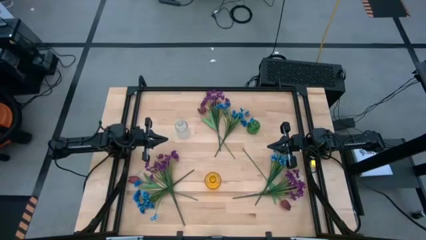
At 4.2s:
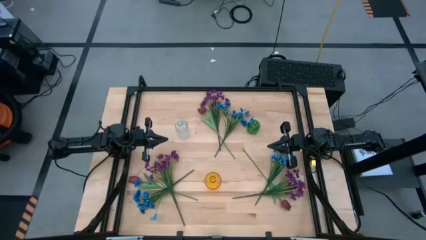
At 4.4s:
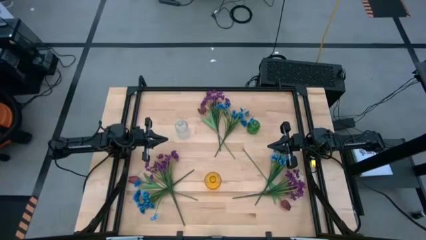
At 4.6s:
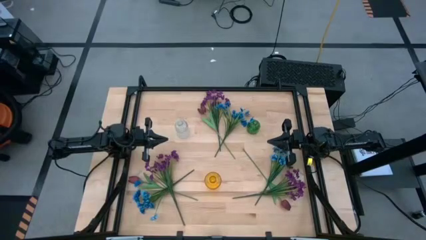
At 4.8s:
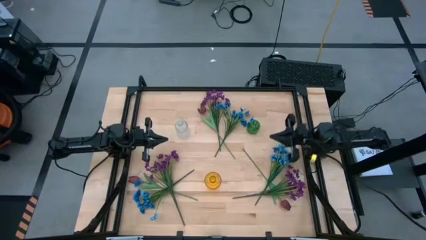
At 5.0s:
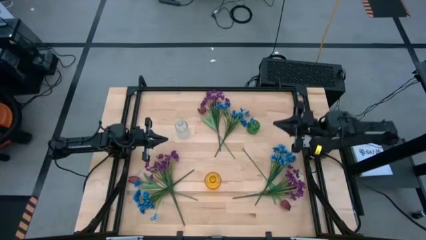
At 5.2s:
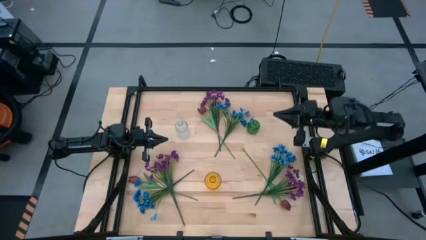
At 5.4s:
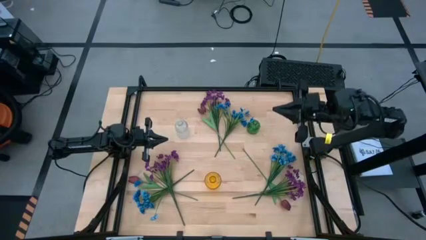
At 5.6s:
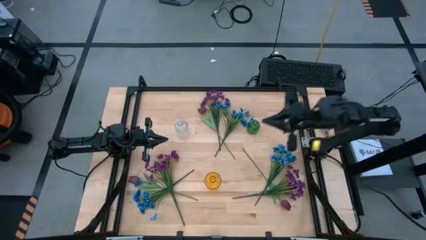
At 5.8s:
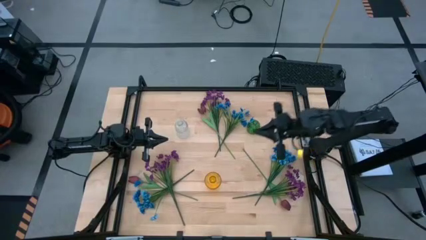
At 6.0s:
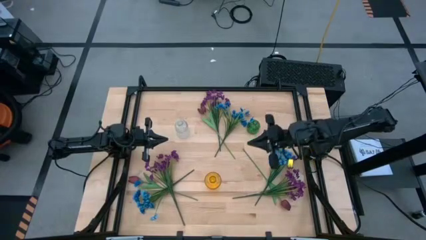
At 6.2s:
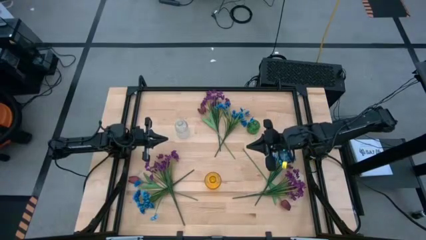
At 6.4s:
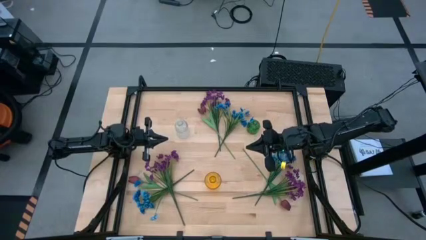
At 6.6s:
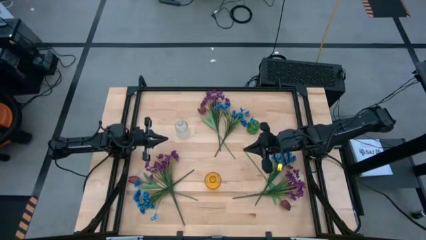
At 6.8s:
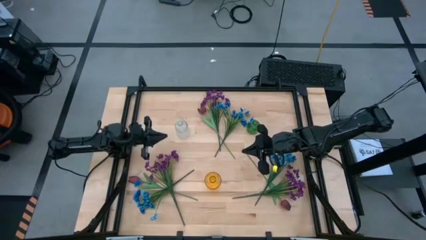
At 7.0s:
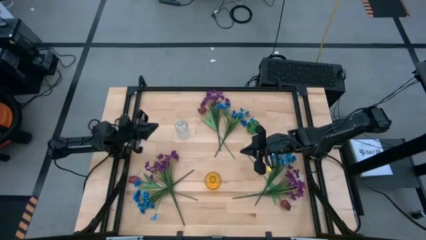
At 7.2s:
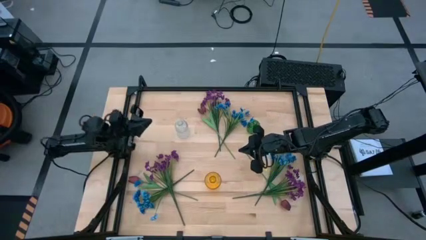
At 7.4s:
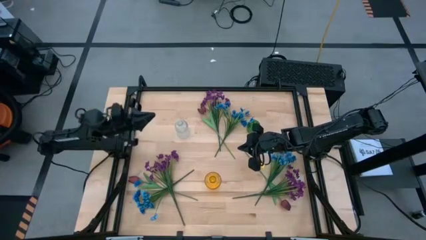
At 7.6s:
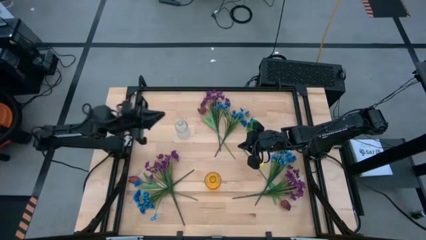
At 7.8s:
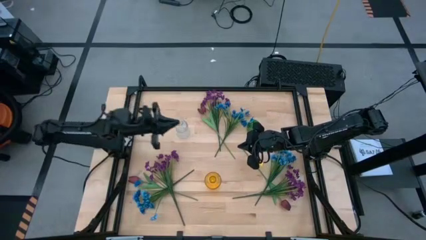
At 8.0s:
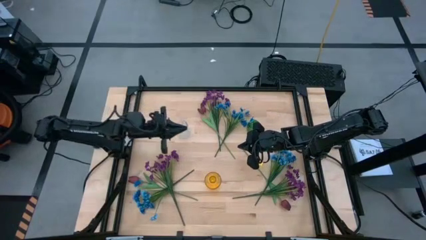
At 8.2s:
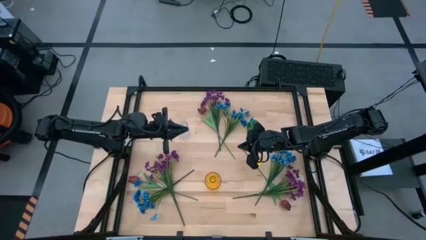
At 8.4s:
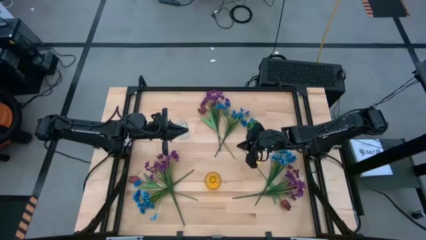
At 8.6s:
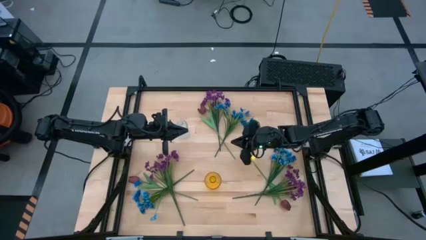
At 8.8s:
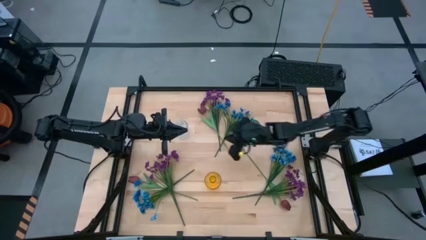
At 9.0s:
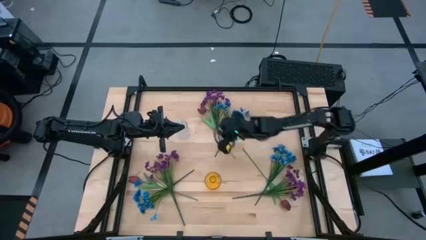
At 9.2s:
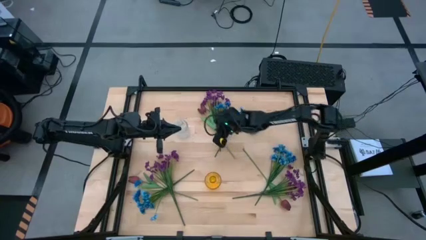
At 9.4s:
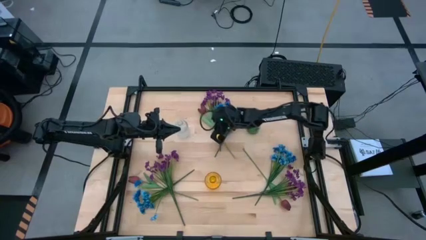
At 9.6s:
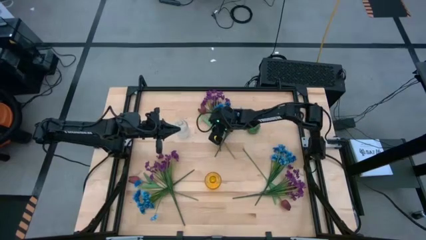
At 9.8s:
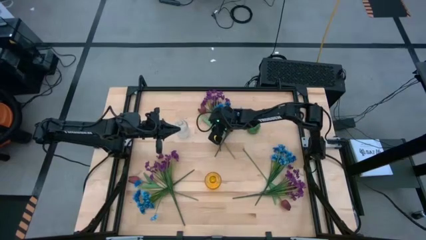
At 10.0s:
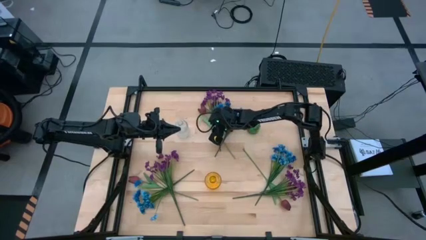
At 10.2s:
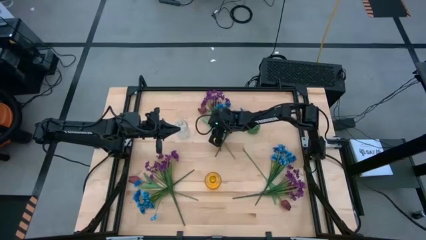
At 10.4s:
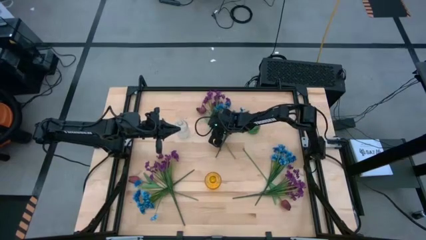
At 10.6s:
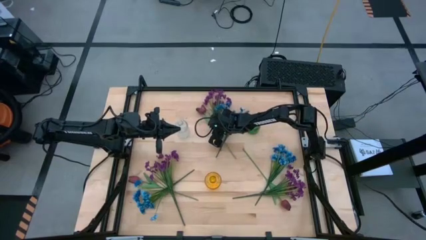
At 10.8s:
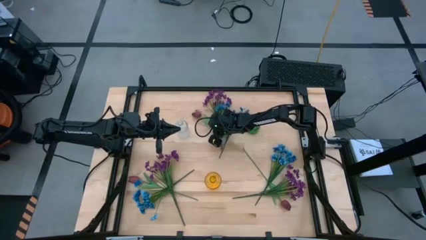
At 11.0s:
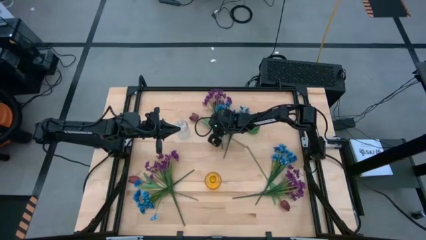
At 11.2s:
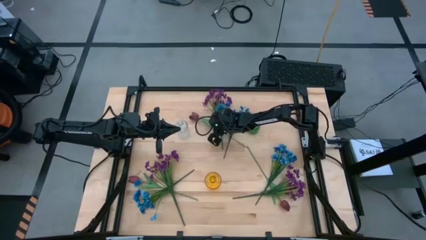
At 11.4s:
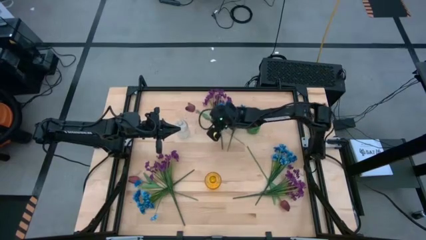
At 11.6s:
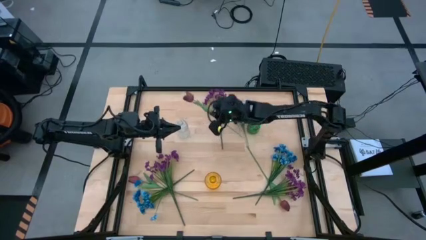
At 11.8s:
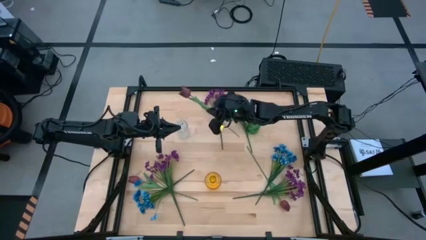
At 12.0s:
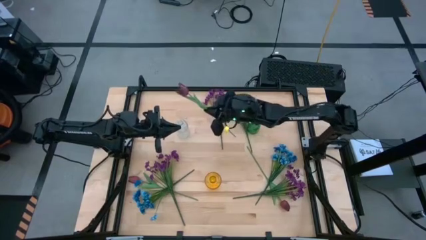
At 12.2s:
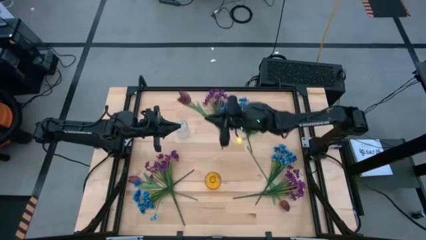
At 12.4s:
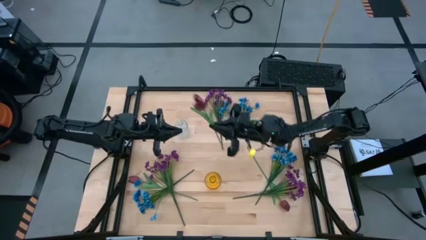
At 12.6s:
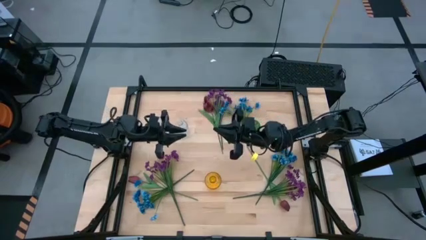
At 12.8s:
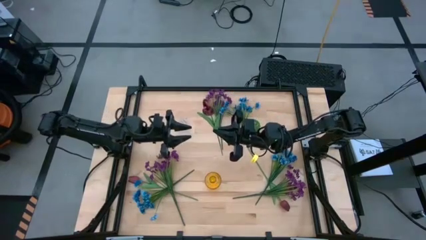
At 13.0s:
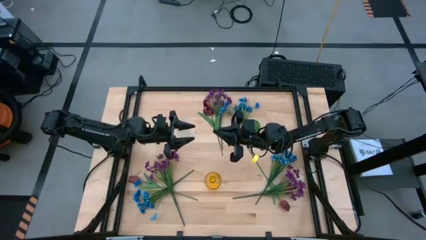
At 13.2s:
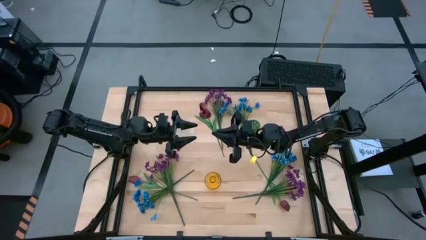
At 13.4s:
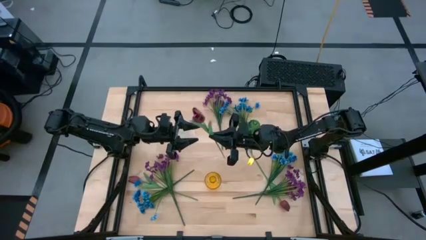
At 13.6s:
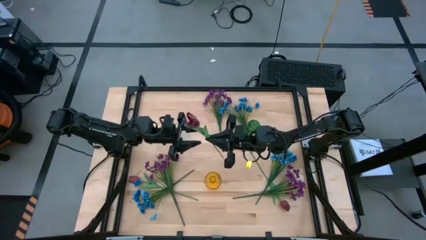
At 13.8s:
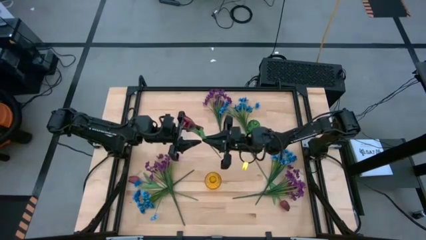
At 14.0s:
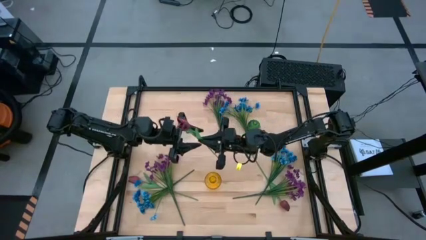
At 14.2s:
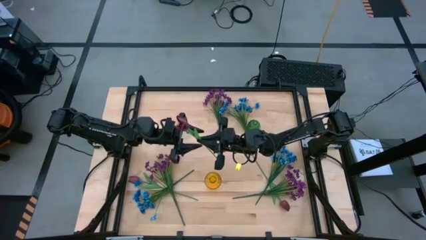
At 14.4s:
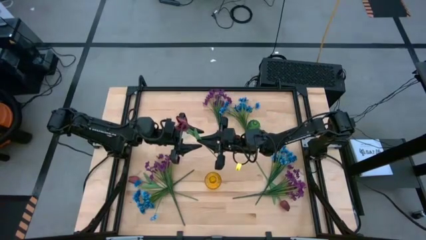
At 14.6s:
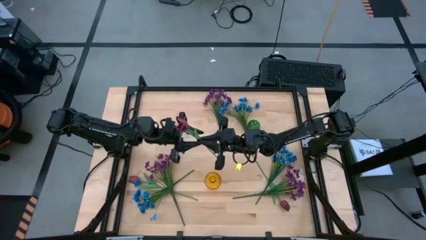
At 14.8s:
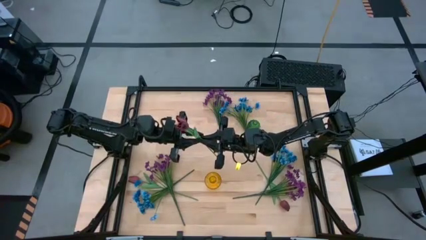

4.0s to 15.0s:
Task: Sort flowers into vase by color
Put the top red flower into the green vase

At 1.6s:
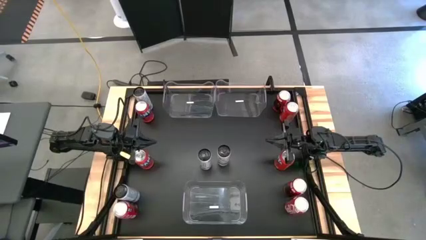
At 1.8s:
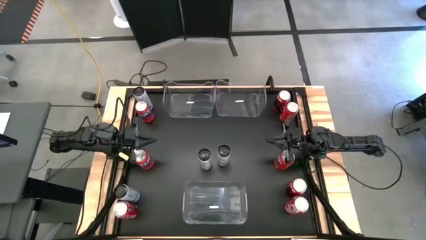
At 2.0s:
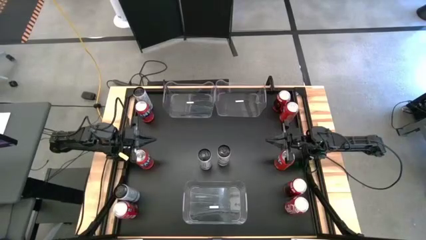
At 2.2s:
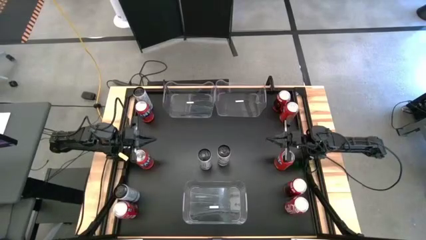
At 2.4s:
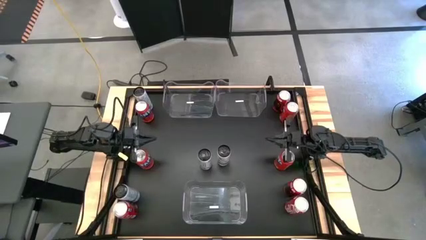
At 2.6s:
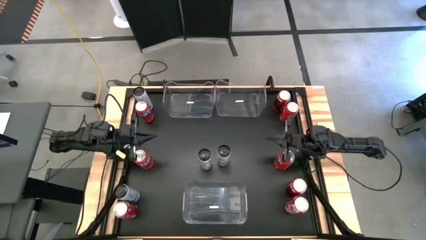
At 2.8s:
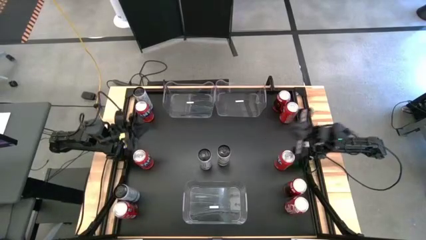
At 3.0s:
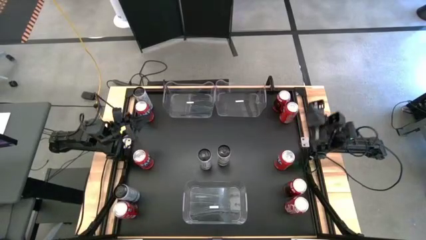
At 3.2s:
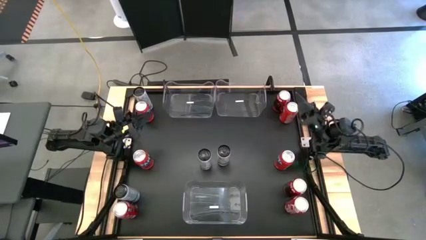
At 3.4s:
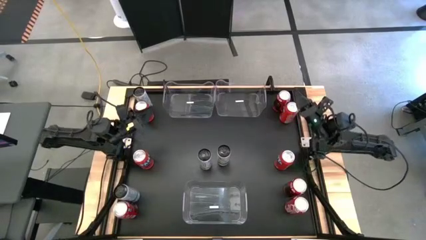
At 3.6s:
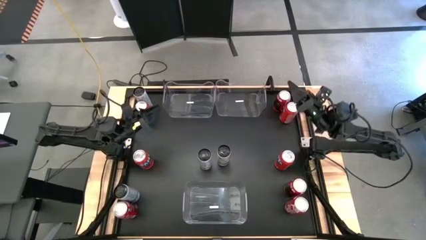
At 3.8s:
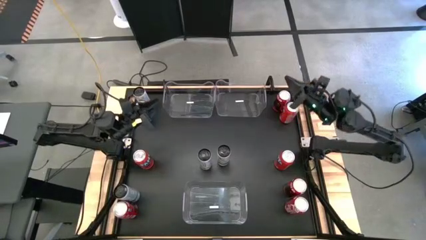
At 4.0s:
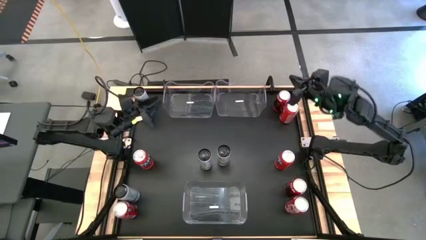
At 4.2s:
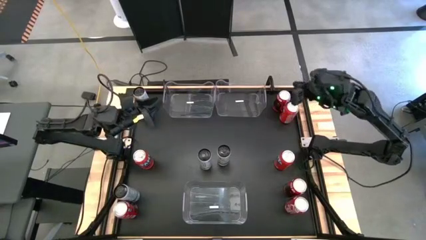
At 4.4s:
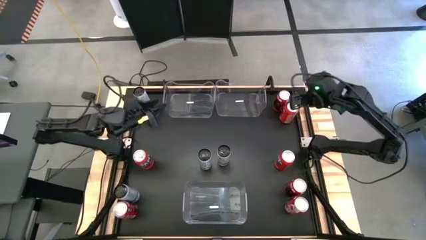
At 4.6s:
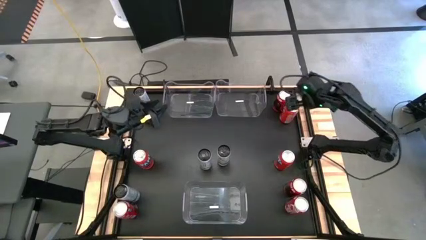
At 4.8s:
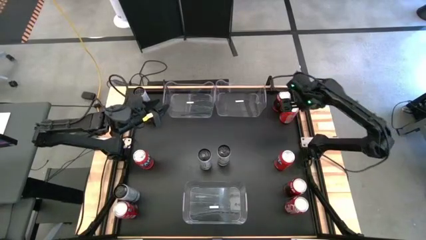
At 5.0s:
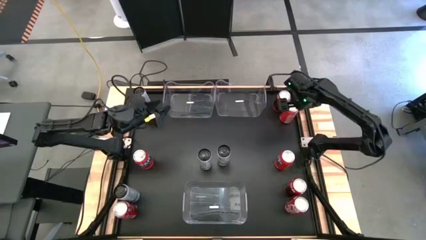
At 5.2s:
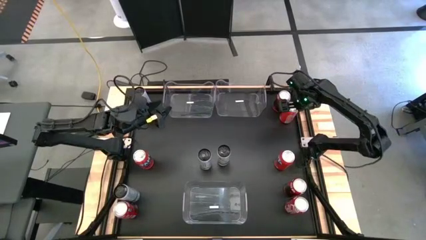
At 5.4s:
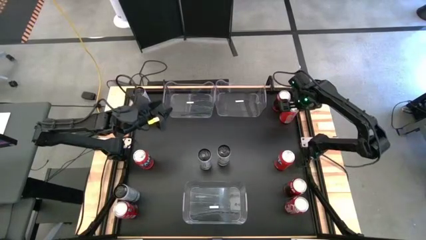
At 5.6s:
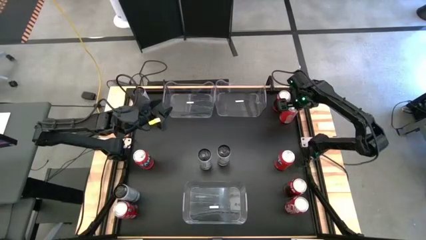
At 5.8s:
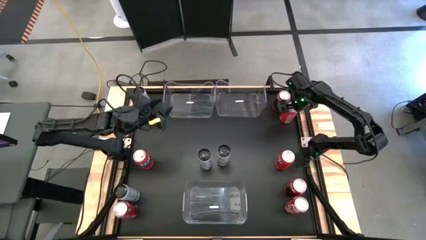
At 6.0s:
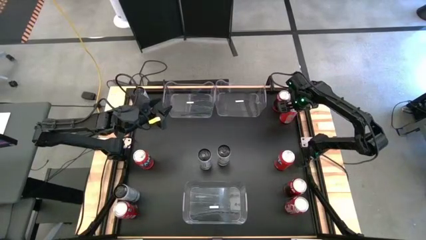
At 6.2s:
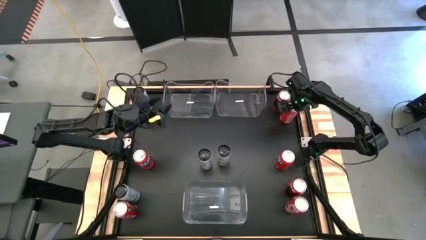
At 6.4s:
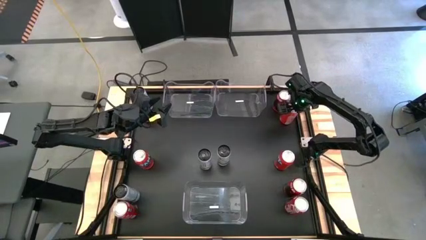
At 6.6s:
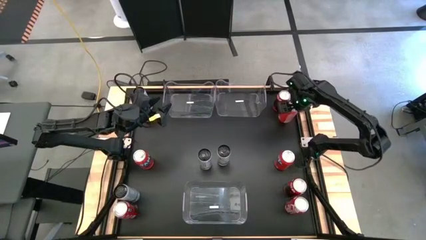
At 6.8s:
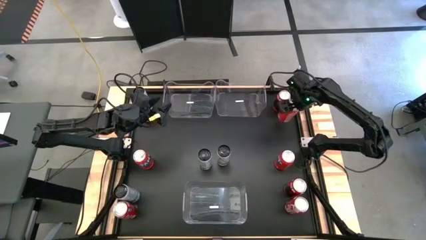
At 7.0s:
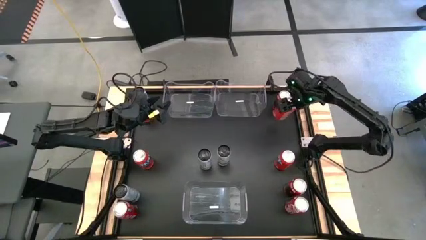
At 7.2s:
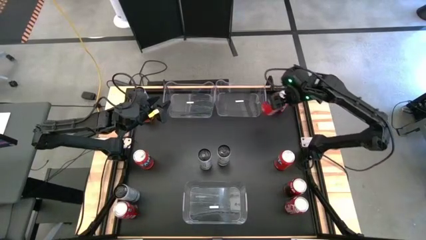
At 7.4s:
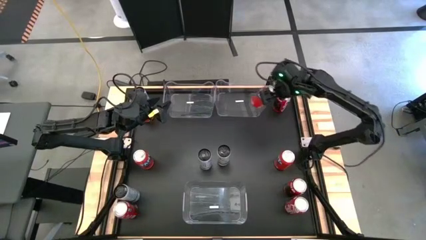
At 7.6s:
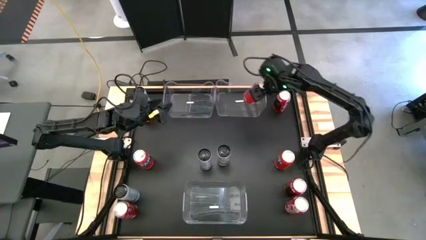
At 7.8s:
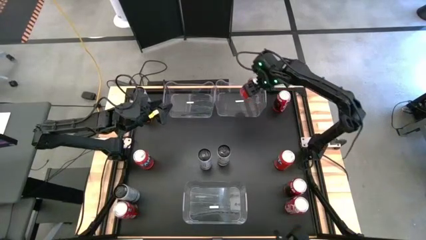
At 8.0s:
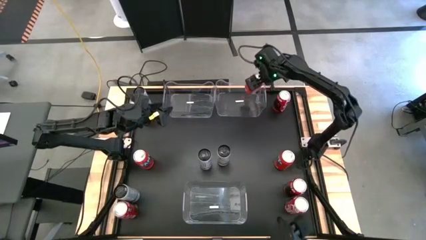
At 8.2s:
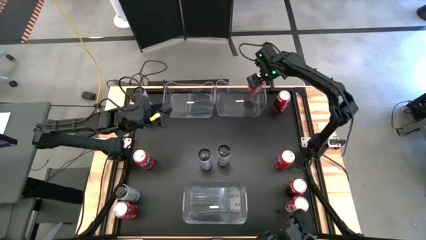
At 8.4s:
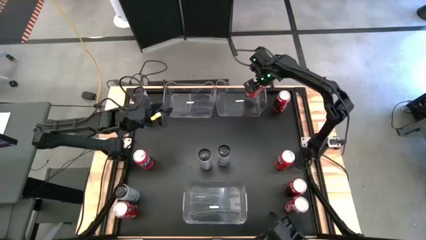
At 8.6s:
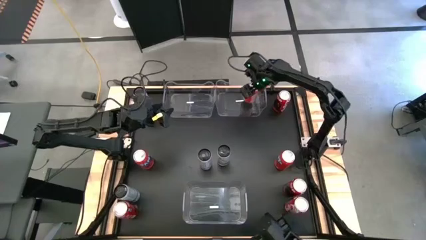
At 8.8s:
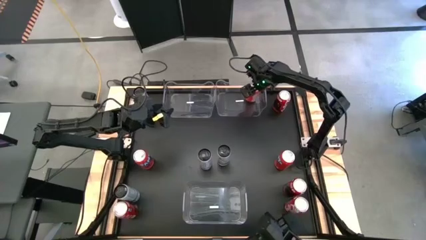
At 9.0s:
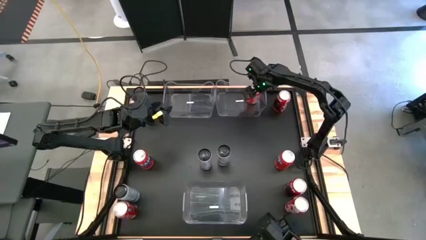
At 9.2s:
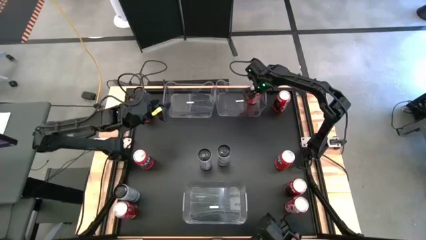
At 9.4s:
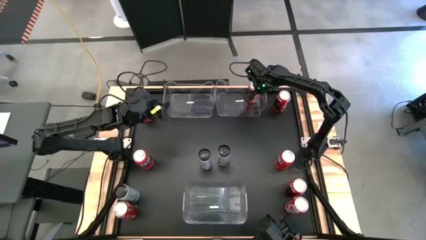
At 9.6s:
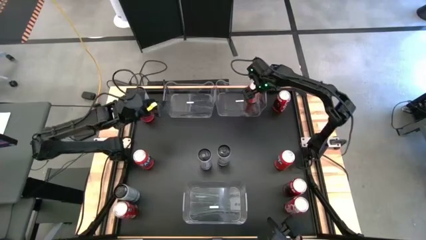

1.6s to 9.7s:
Task: Sort soda cans
Put the top right orange soda can into the top right transparent bin
